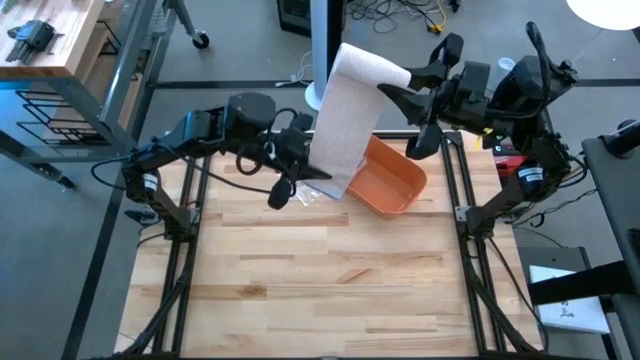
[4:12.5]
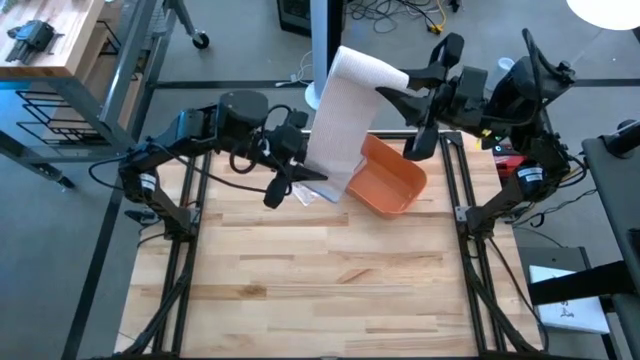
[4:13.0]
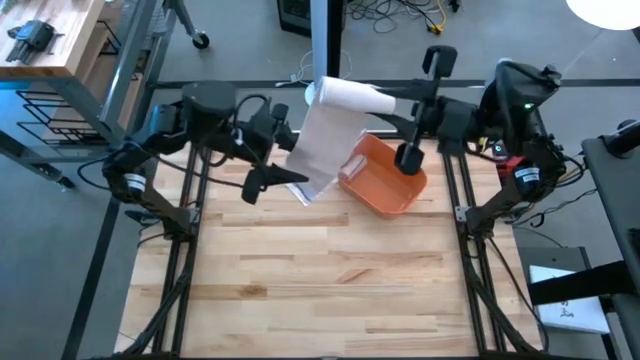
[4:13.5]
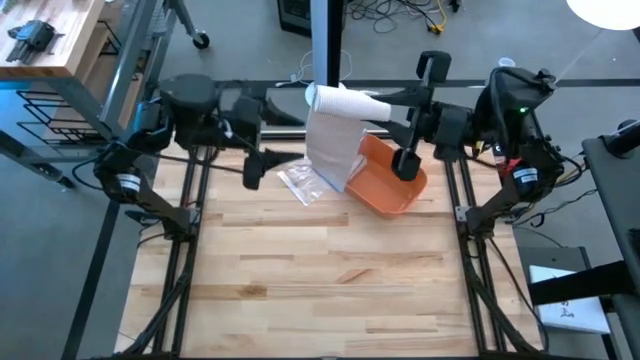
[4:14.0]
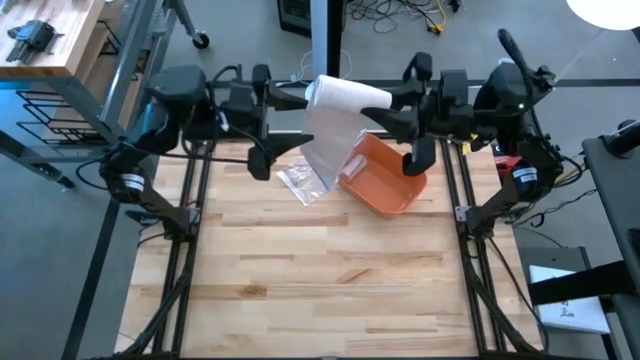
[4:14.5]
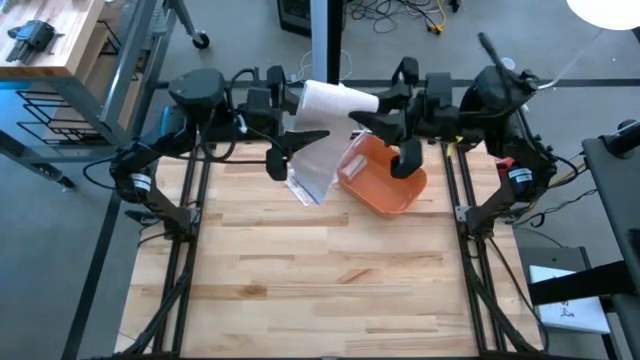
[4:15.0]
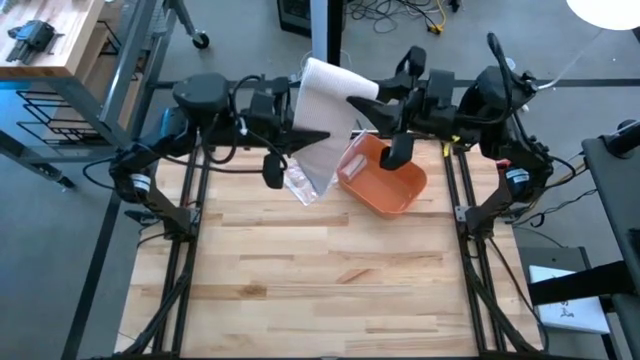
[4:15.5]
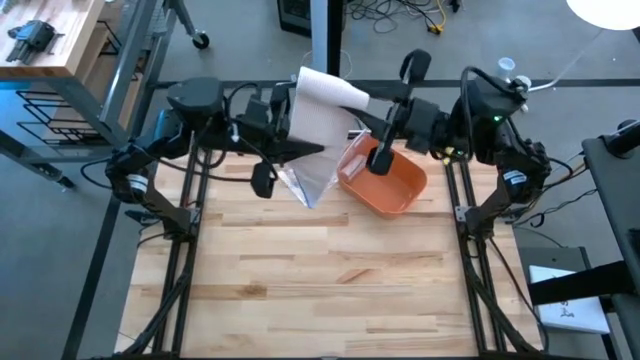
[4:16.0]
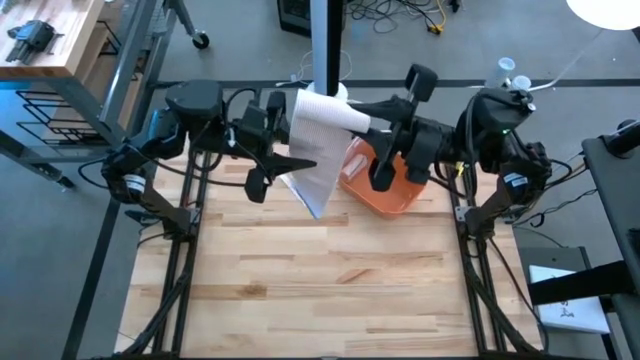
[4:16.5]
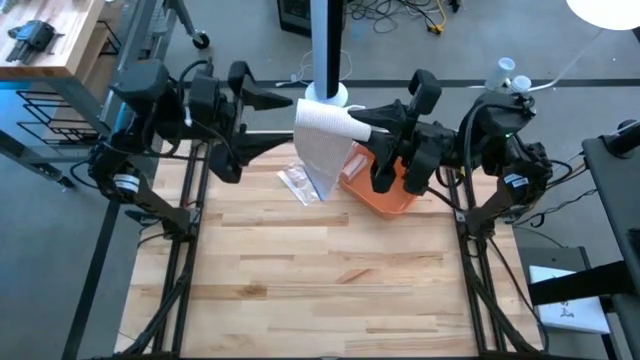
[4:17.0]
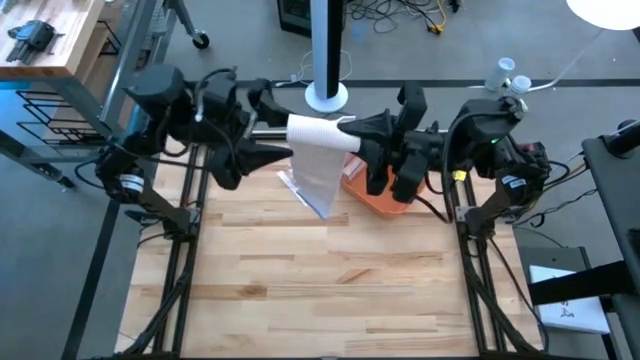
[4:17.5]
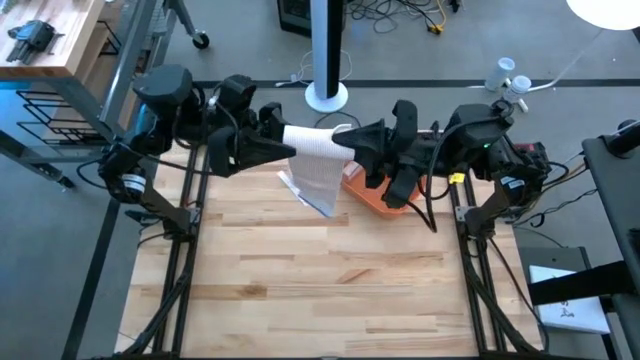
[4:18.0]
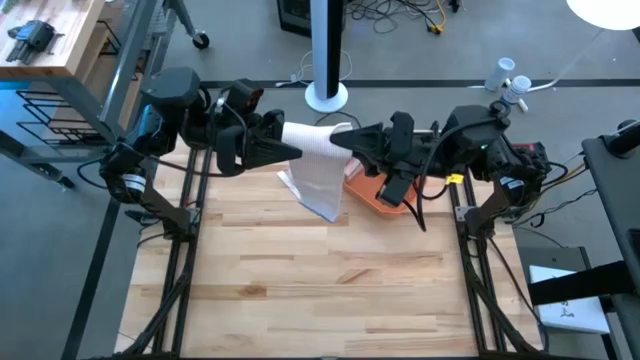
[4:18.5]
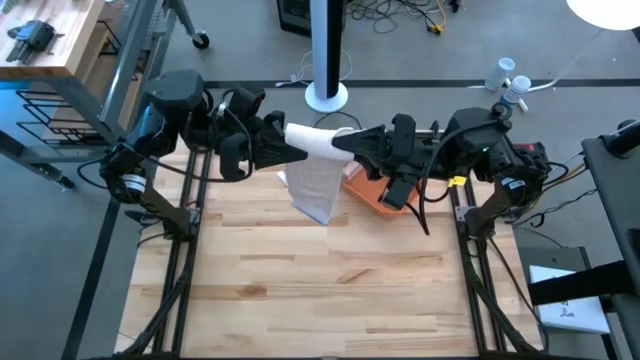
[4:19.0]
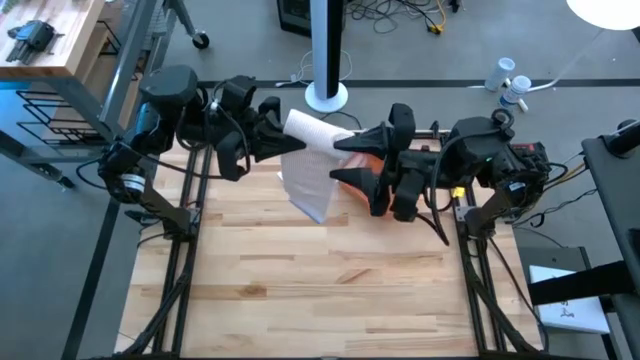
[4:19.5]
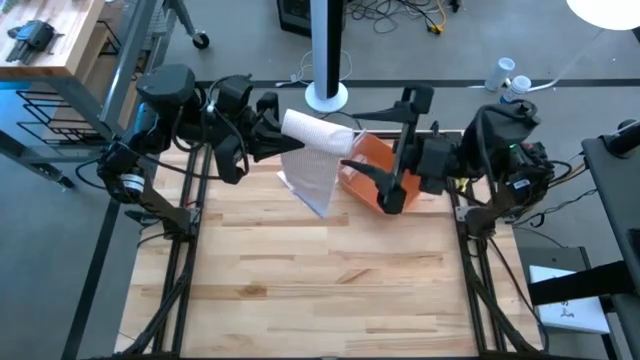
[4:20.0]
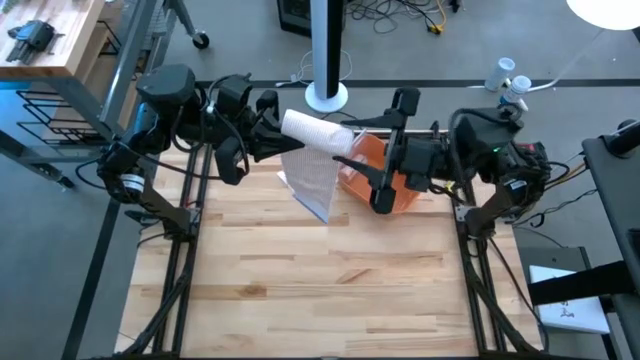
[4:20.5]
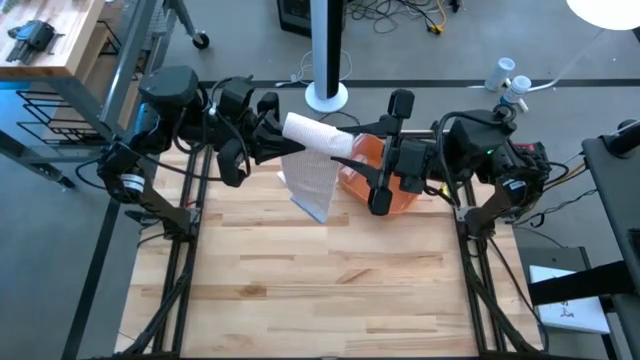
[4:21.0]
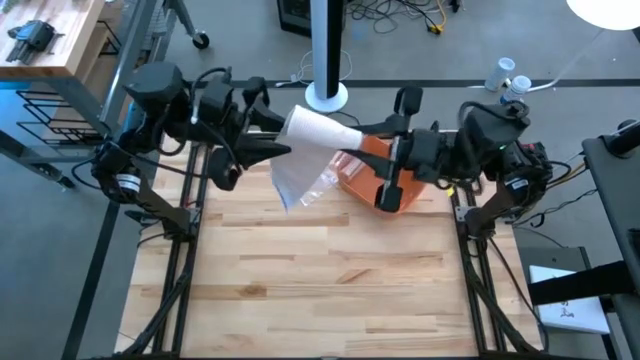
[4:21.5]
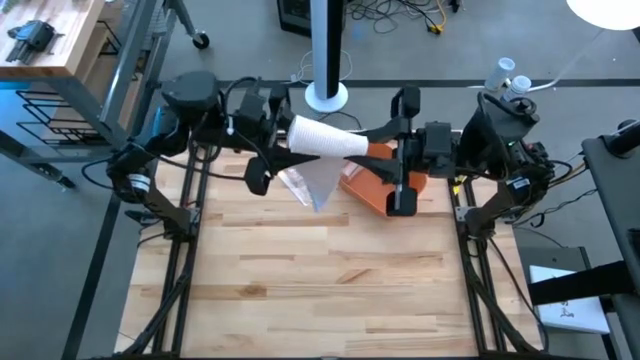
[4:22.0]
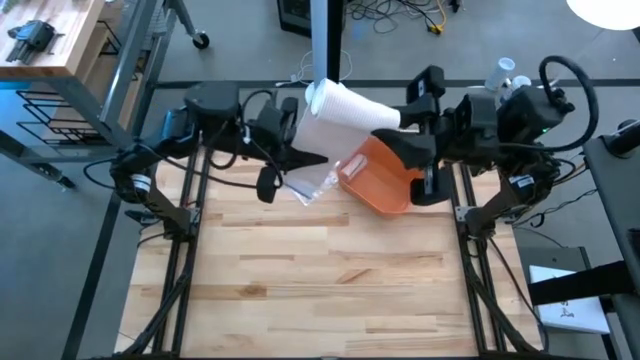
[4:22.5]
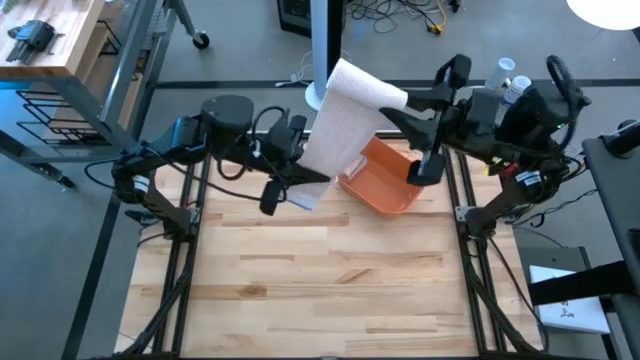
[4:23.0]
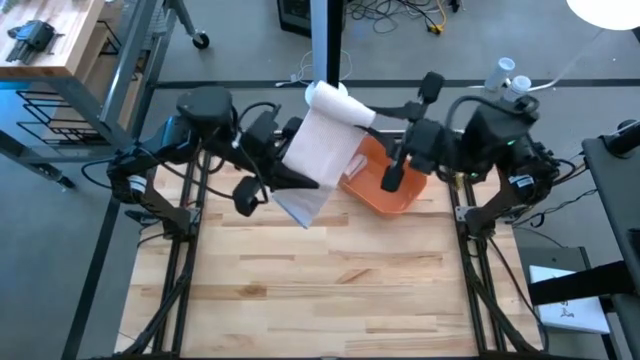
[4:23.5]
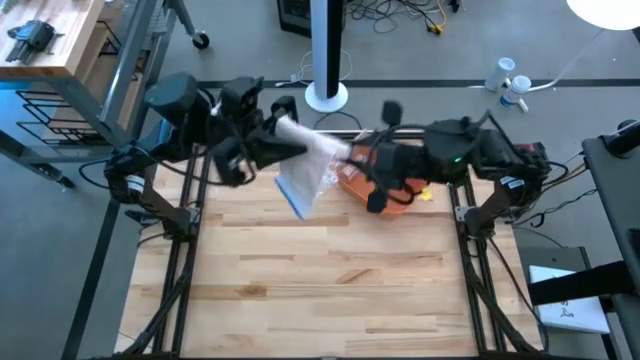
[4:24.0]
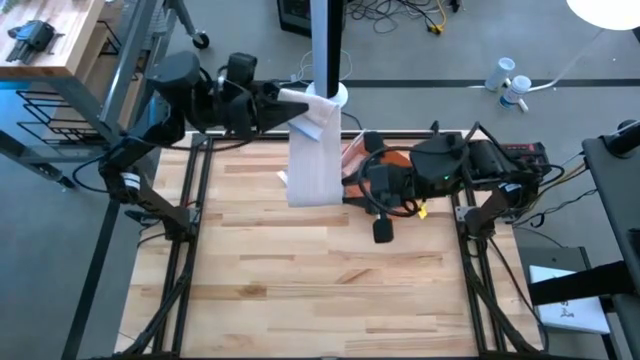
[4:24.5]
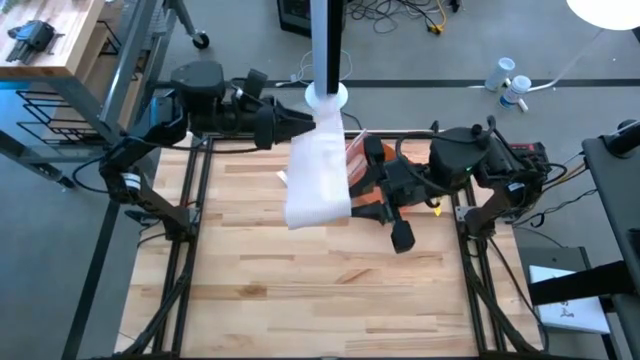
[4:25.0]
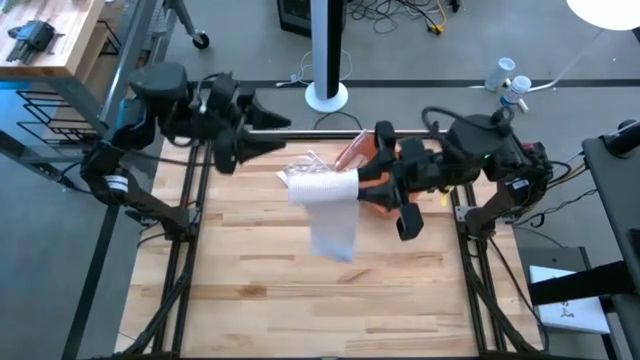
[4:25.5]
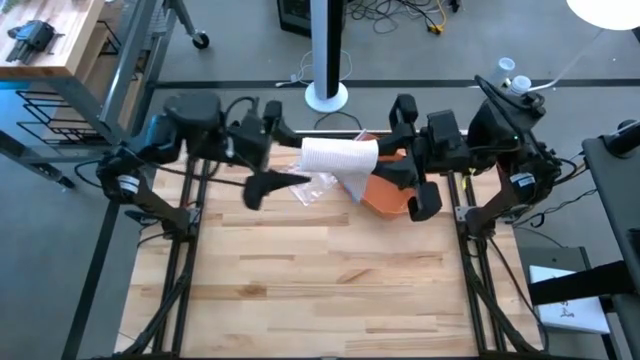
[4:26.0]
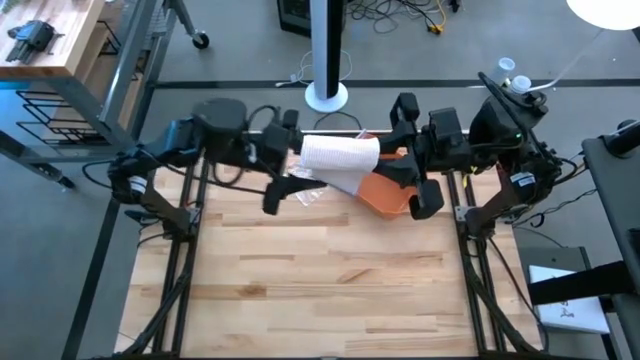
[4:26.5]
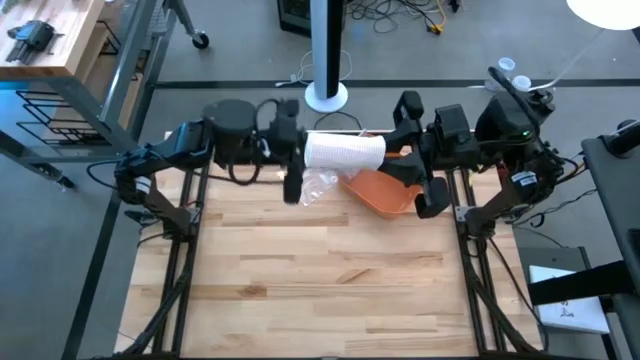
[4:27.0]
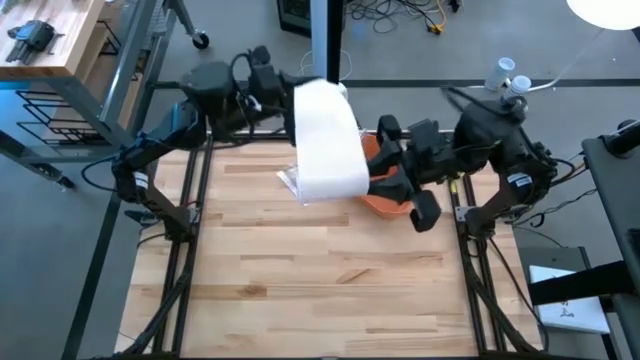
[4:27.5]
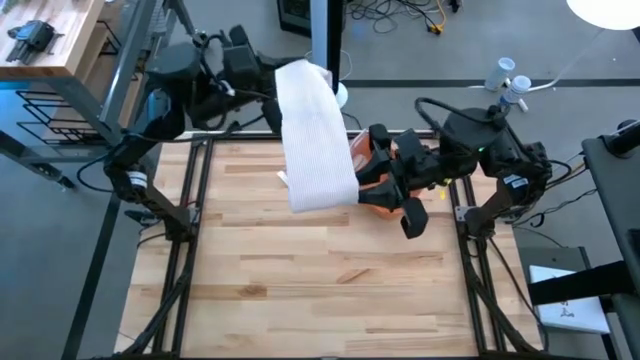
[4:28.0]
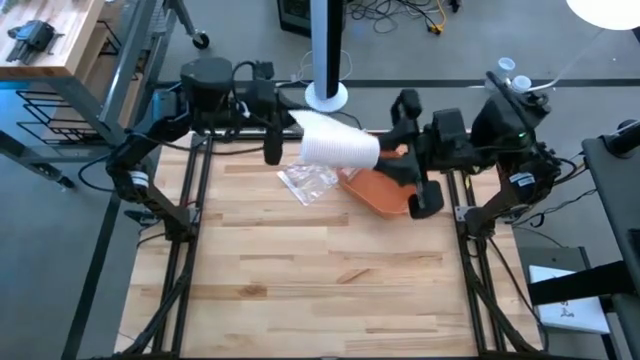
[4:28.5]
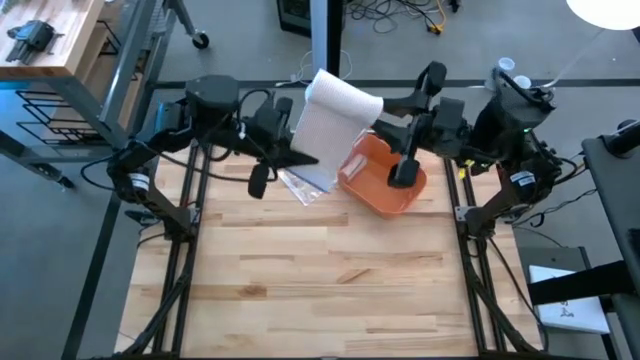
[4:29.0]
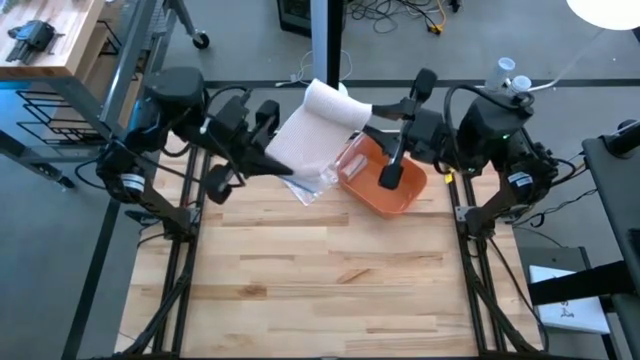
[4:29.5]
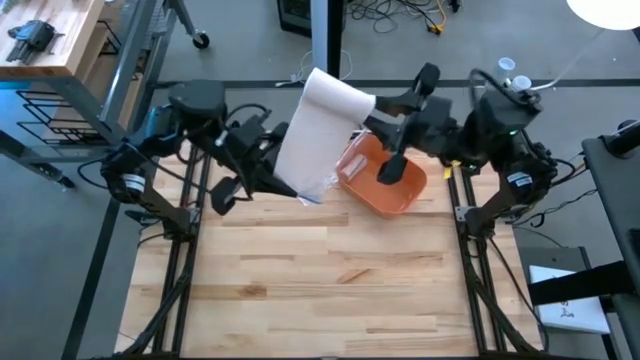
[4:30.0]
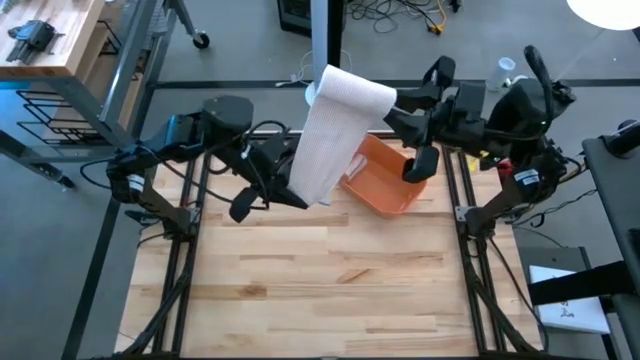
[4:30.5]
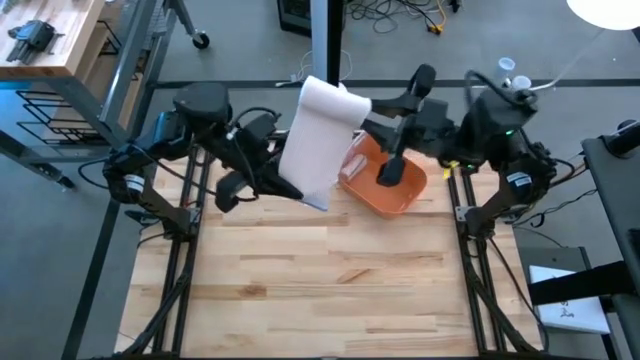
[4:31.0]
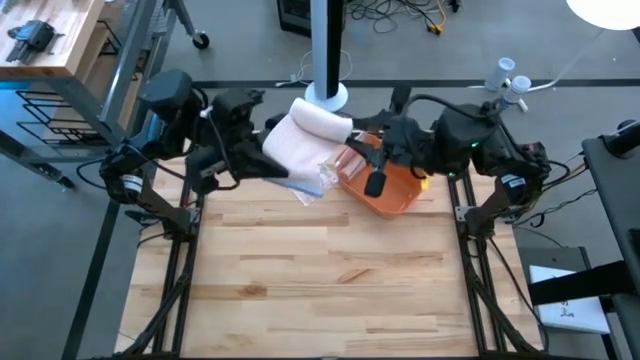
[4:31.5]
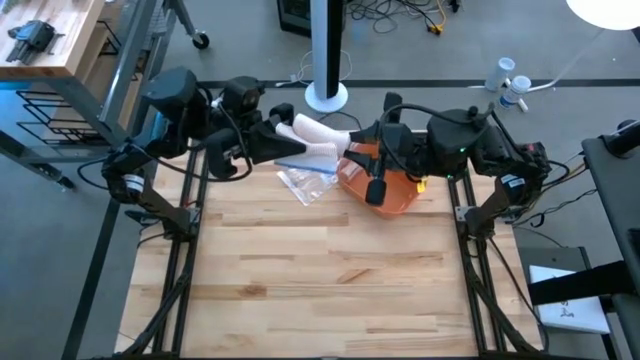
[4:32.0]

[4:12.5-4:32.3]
Task: Roll bandage
Roll the brown bandage
